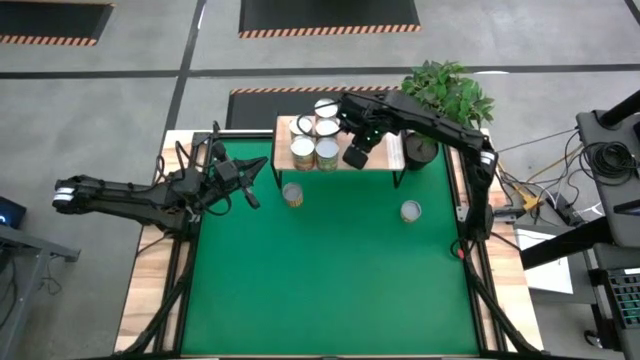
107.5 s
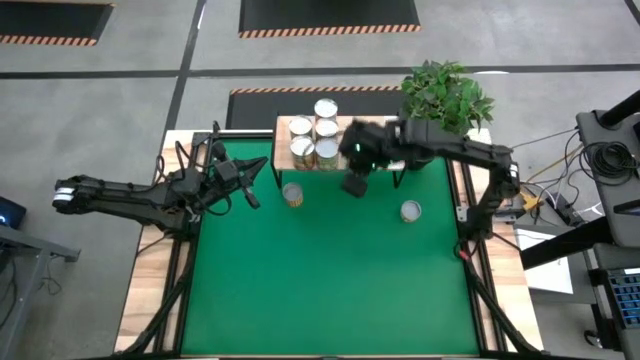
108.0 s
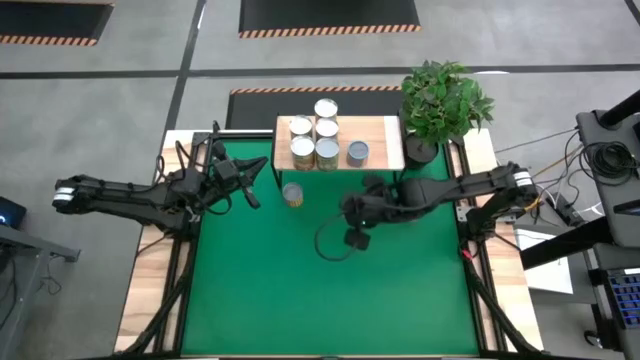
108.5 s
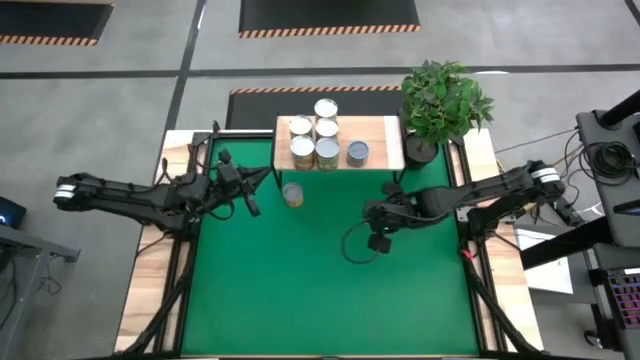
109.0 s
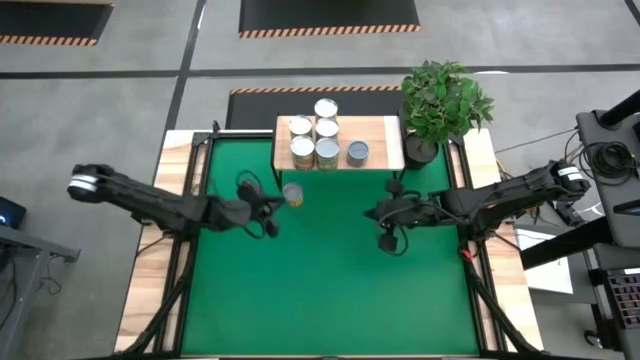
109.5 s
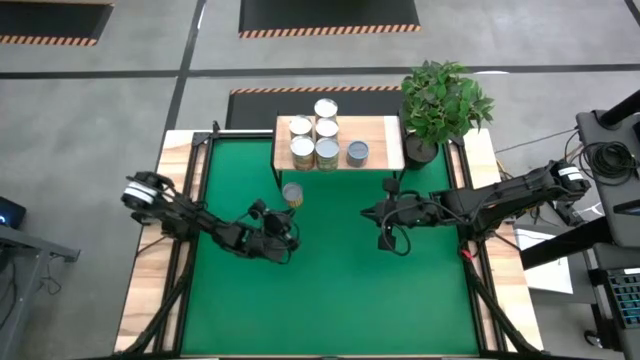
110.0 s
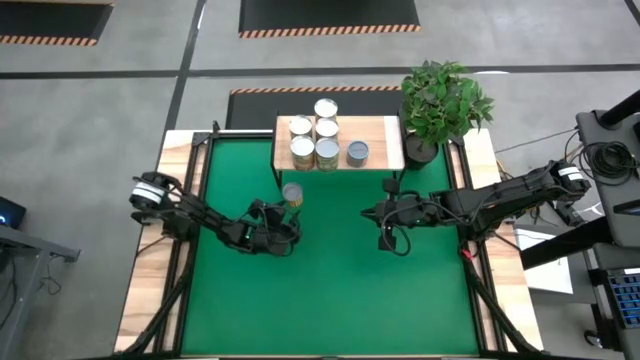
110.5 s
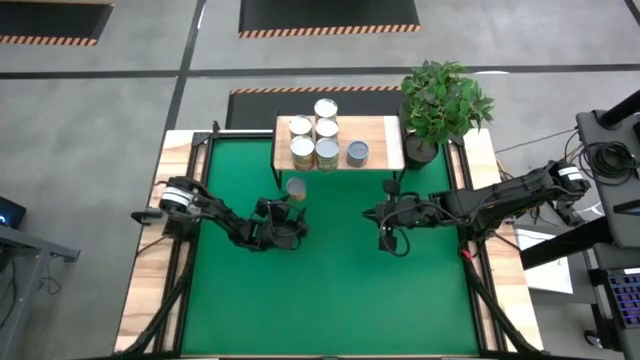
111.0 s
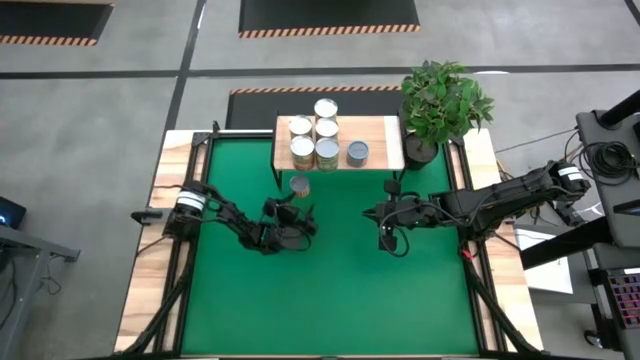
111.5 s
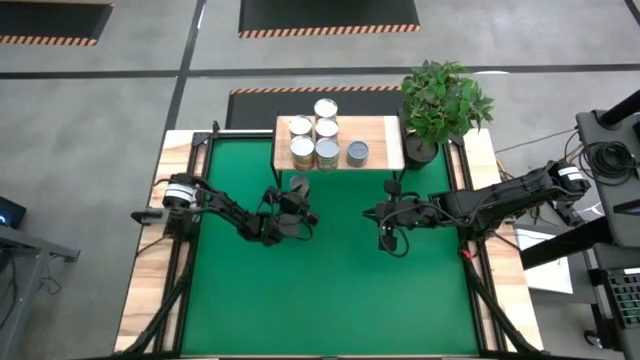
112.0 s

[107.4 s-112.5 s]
Task: Pick and place cans onto a shelf
Put the small canned beans on the shelf

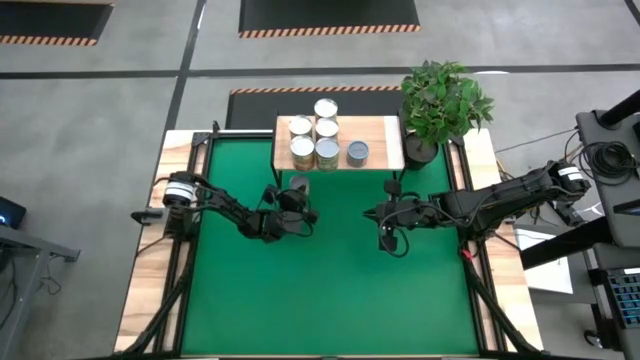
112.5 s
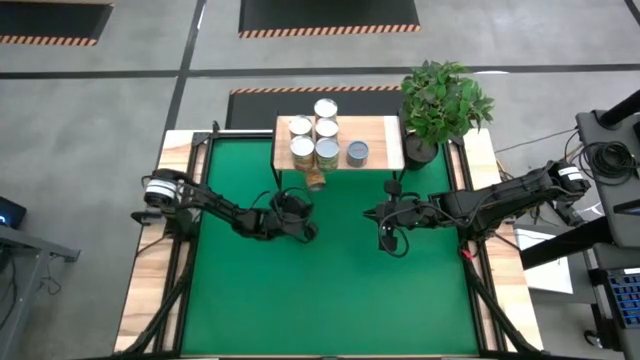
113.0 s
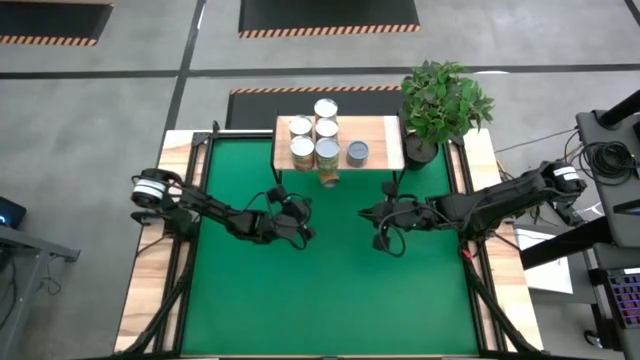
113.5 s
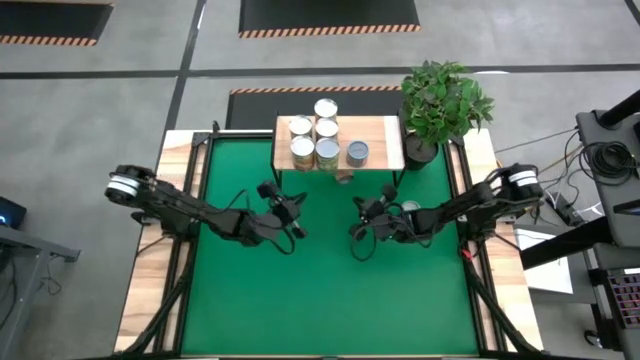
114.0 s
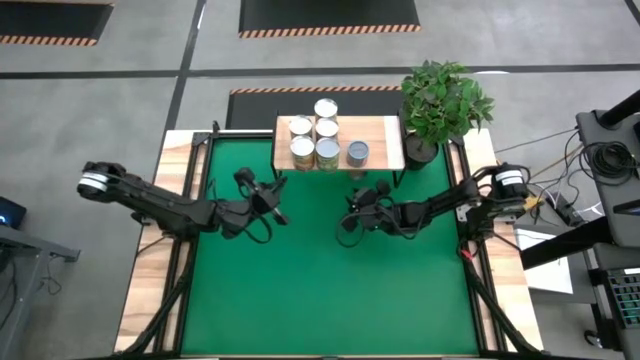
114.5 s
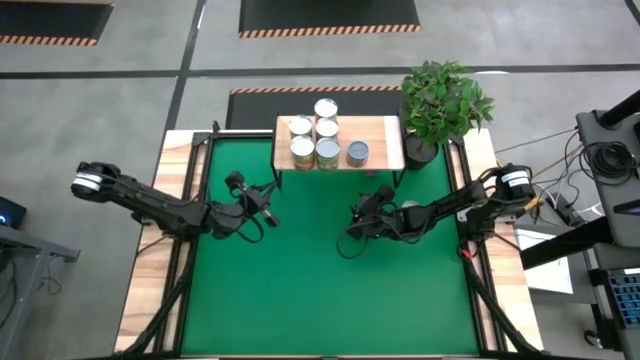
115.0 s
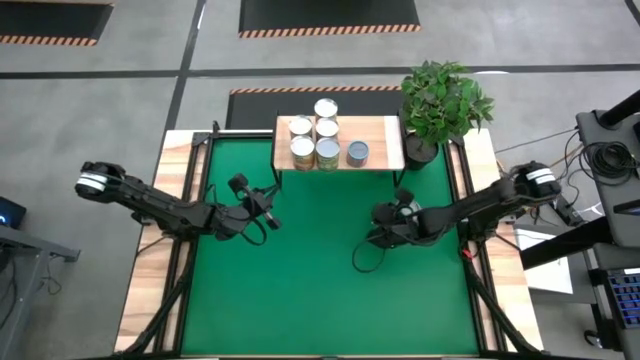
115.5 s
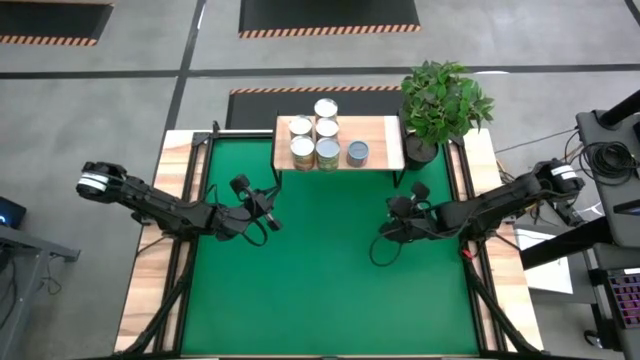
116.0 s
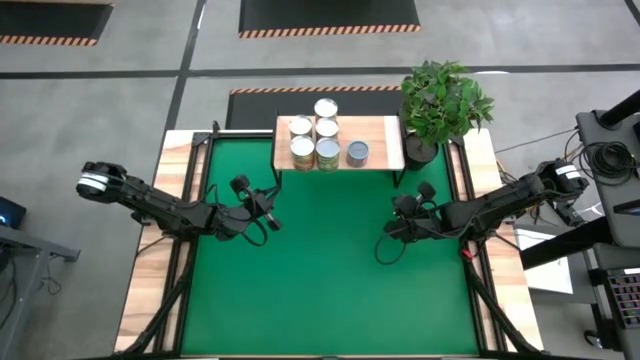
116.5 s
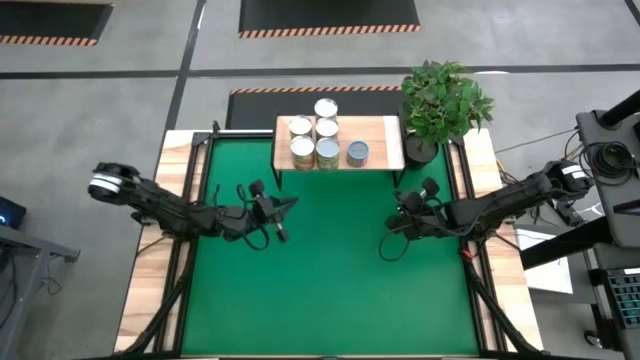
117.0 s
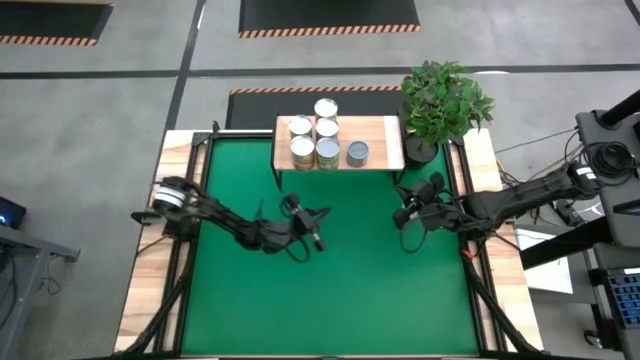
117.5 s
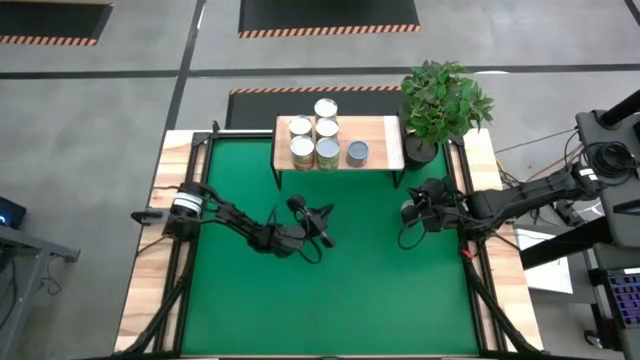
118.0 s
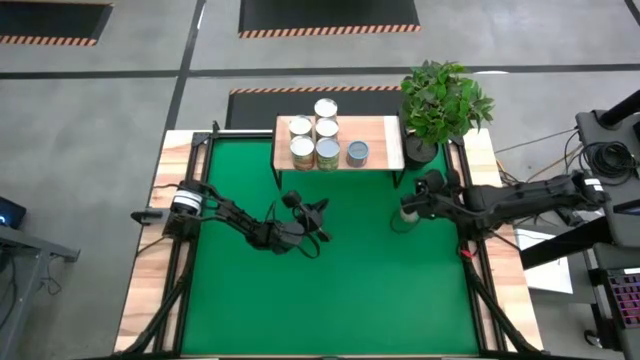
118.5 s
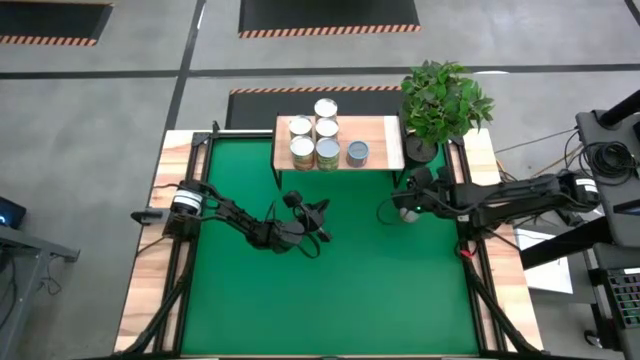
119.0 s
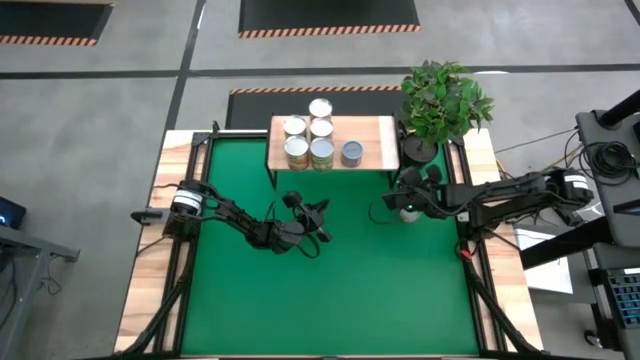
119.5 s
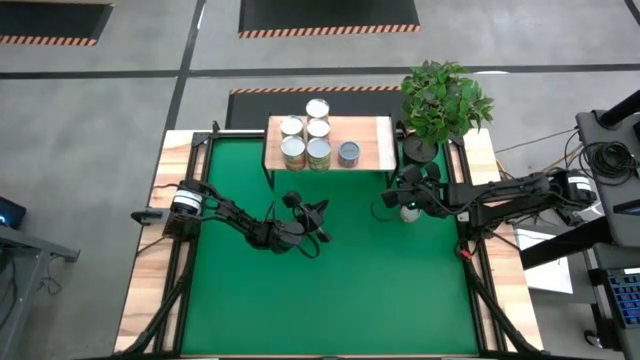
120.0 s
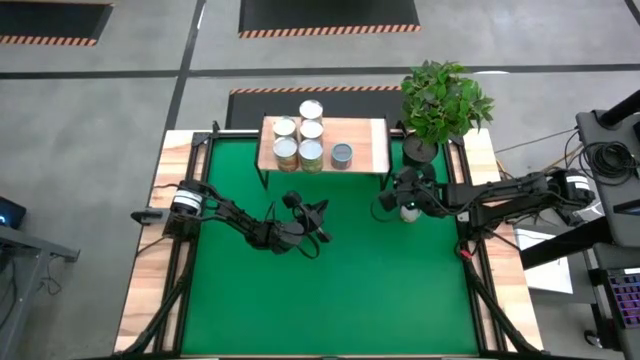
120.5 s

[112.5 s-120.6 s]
Adjust the shelf

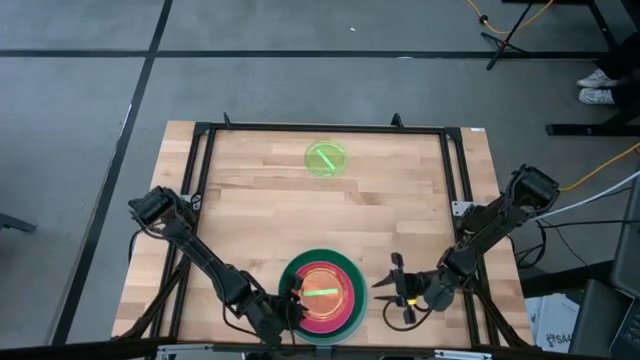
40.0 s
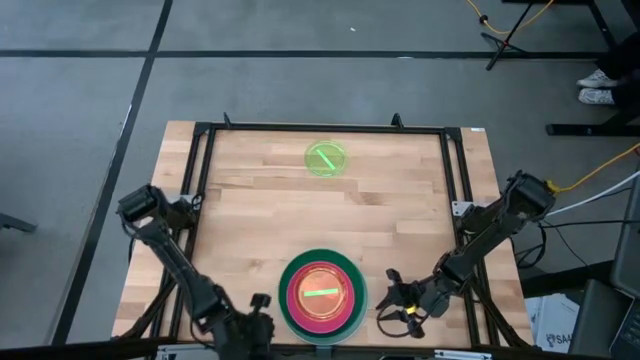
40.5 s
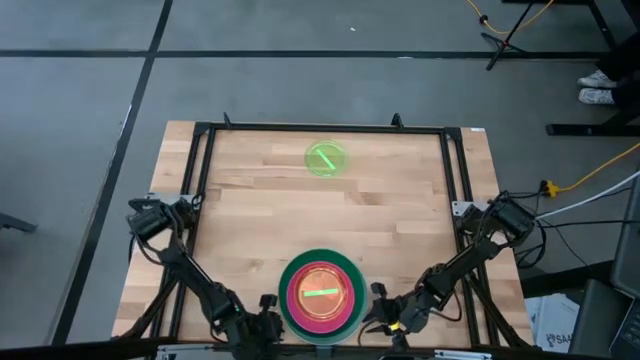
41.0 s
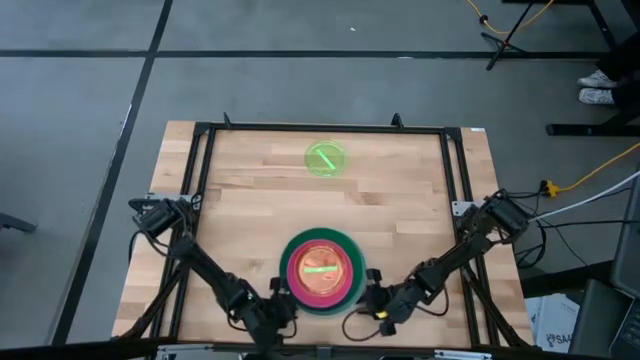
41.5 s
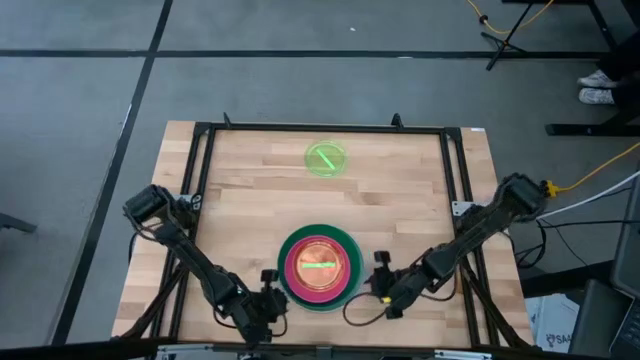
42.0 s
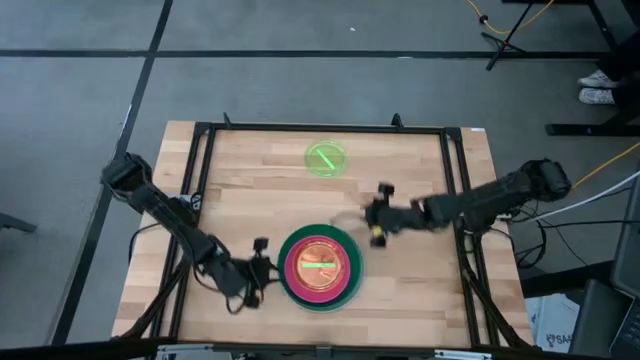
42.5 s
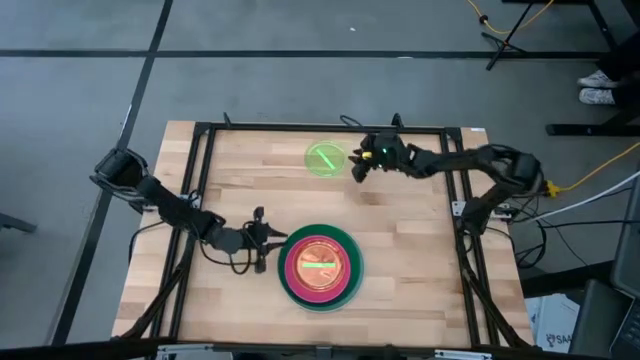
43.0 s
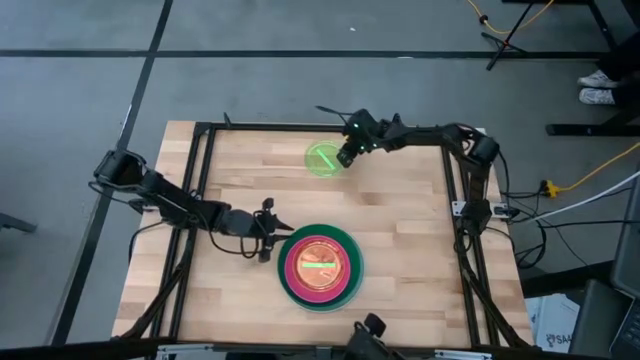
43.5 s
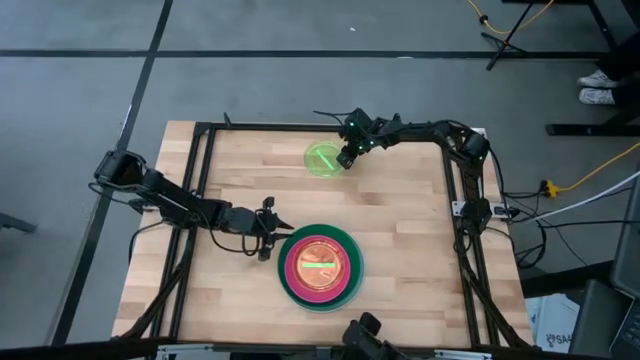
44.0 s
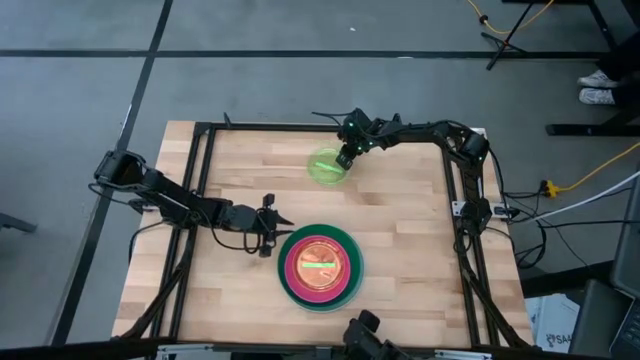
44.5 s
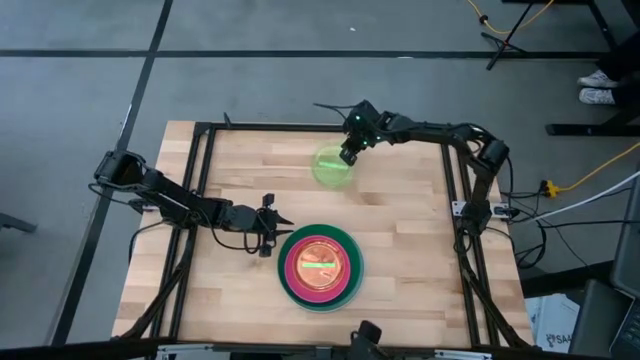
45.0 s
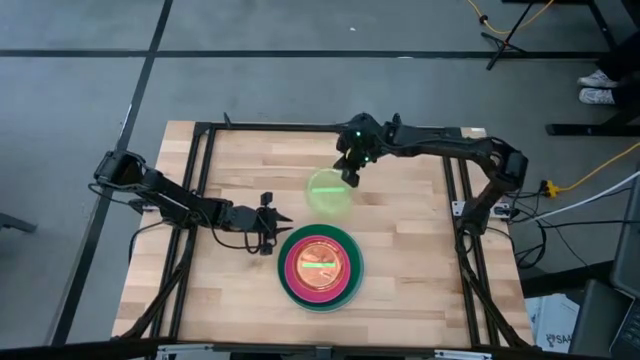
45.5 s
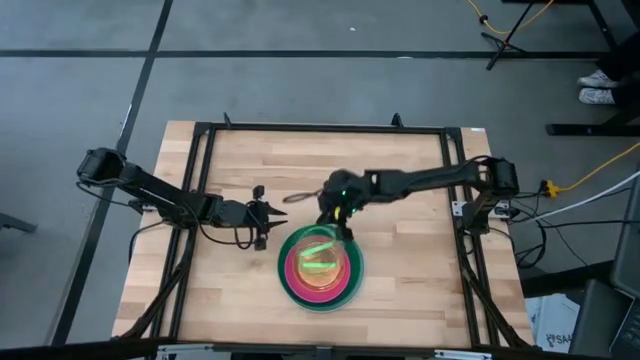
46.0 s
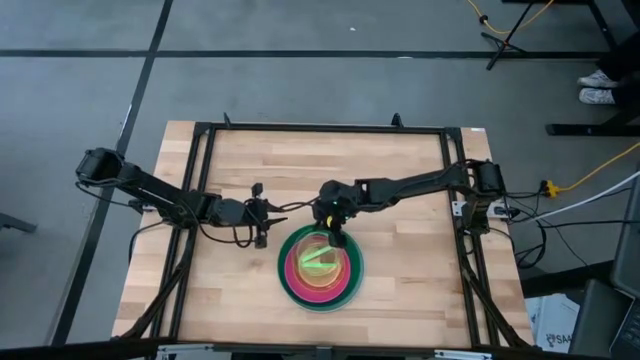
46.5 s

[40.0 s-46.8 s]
Task: Stack plastic plates
Stack the light green plate on top of the other light green plate
